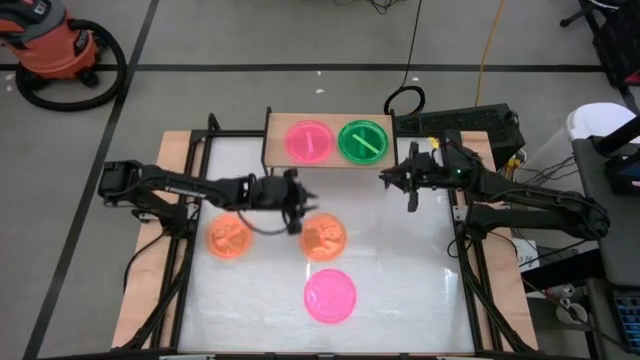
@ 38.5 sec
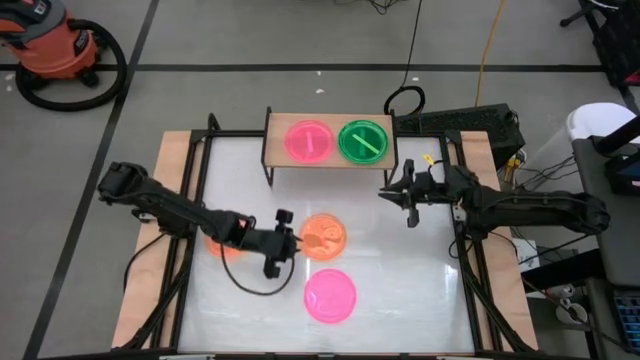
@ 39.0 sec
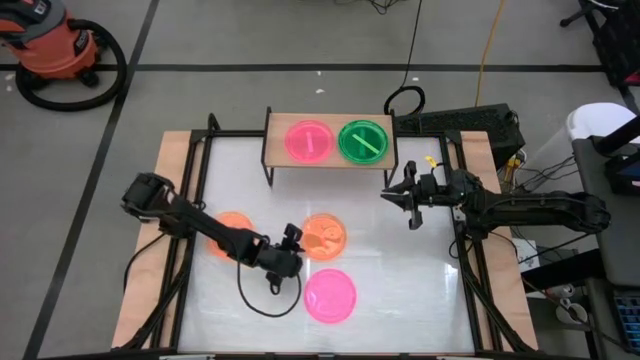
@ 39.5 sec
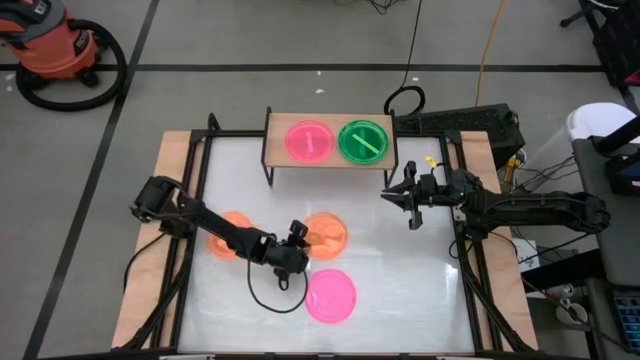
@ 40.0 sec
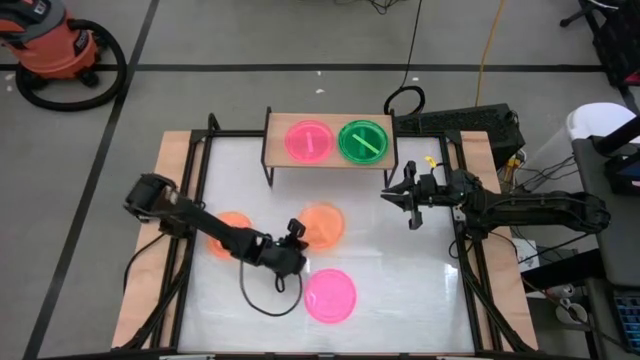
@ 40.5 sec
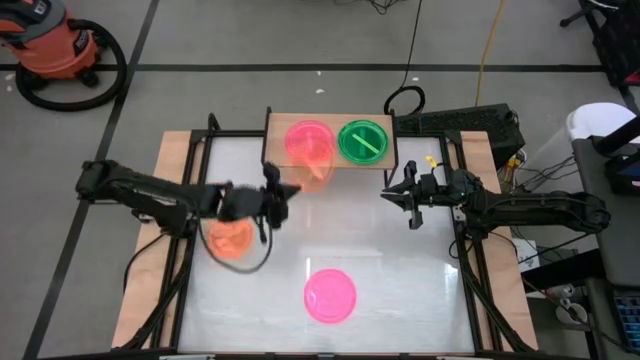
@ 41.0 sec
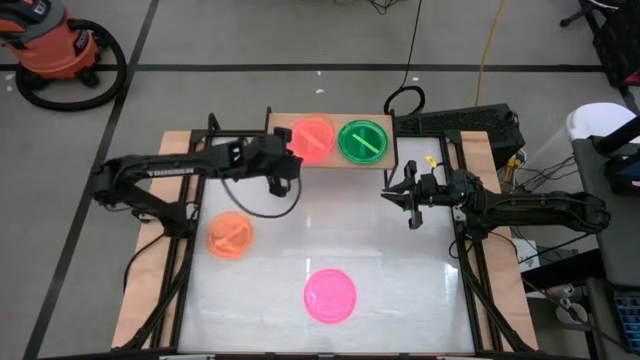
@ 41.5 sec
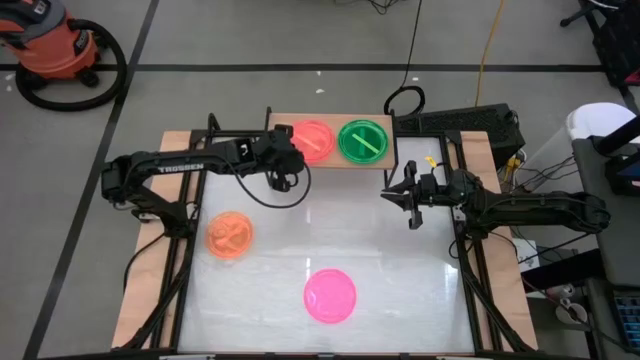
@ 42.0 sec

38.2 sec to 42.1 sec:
Task: Place and stack plates onto a shelf
Stack the right orange plate on top of the pink plate on the shelf

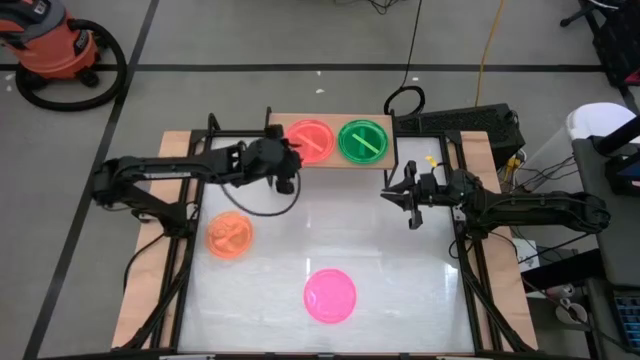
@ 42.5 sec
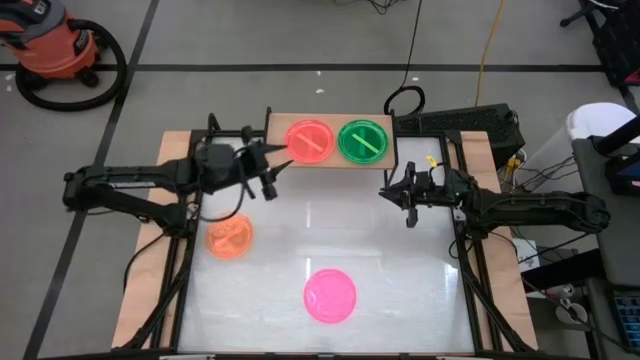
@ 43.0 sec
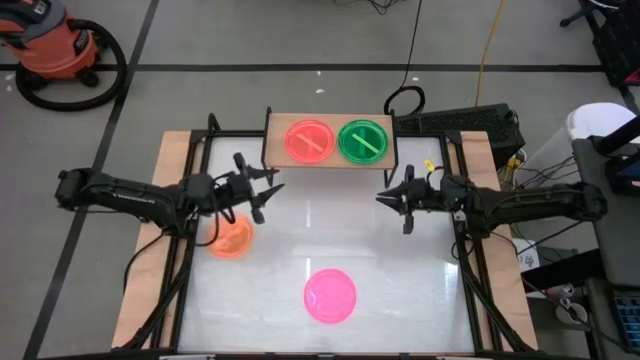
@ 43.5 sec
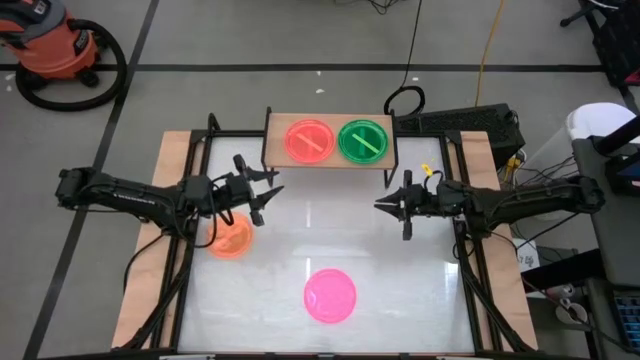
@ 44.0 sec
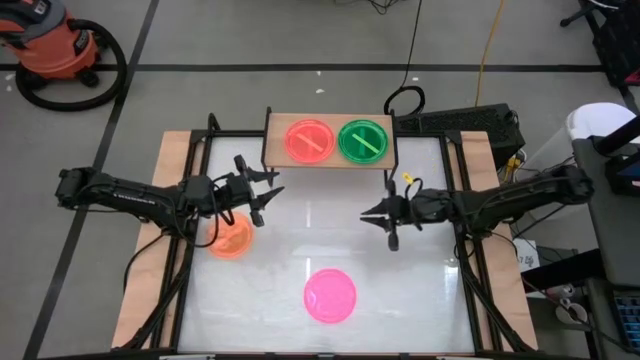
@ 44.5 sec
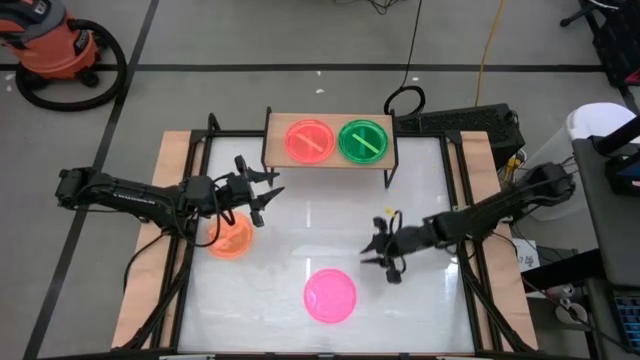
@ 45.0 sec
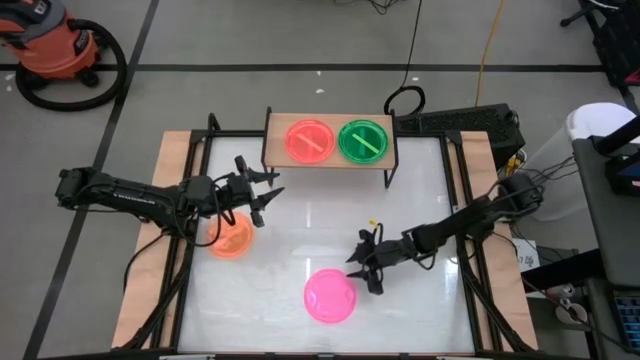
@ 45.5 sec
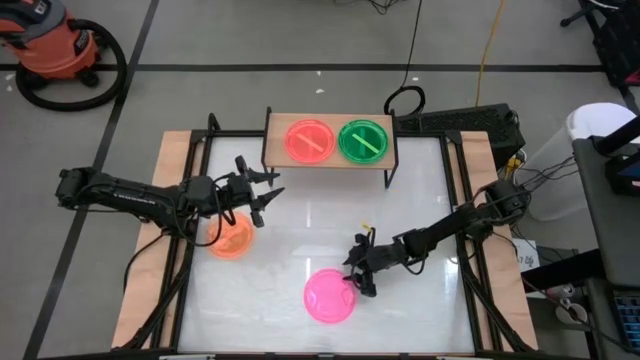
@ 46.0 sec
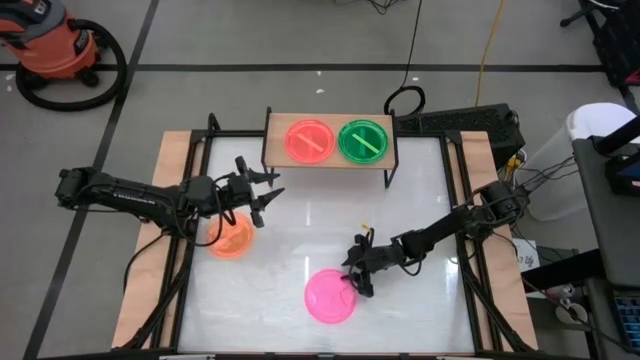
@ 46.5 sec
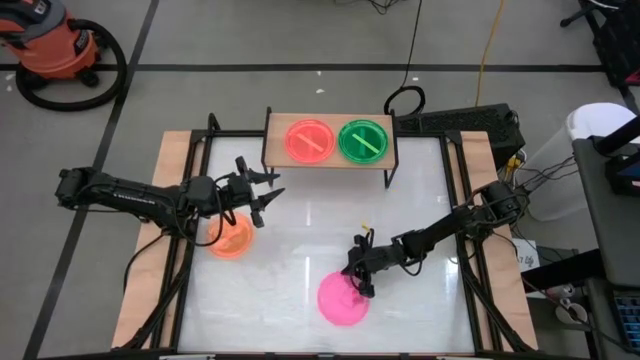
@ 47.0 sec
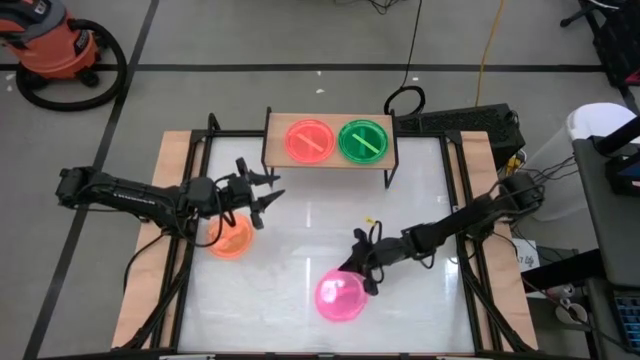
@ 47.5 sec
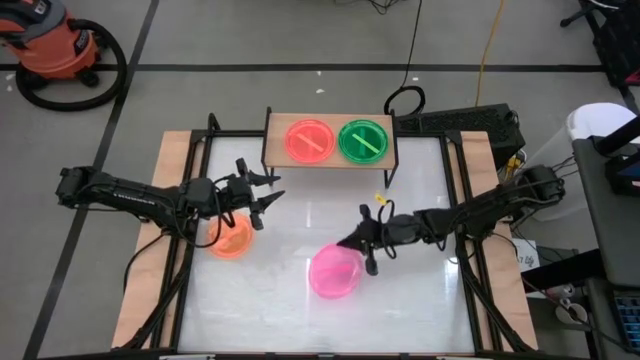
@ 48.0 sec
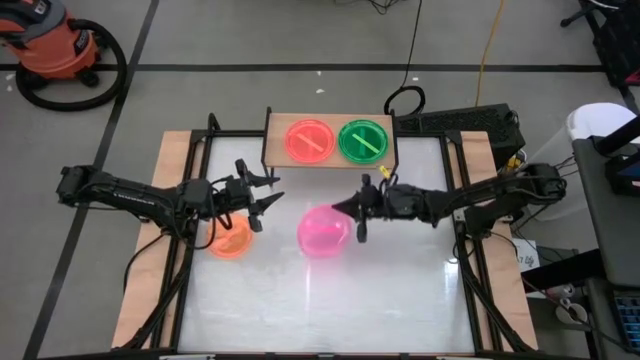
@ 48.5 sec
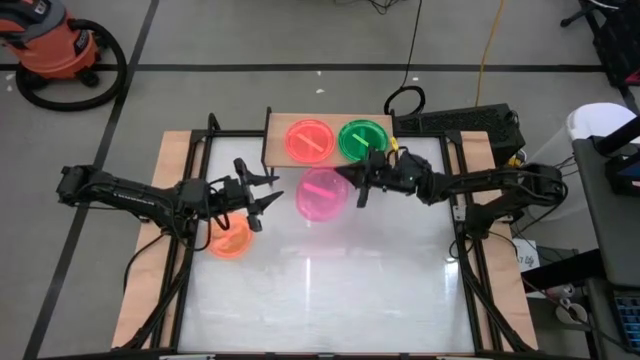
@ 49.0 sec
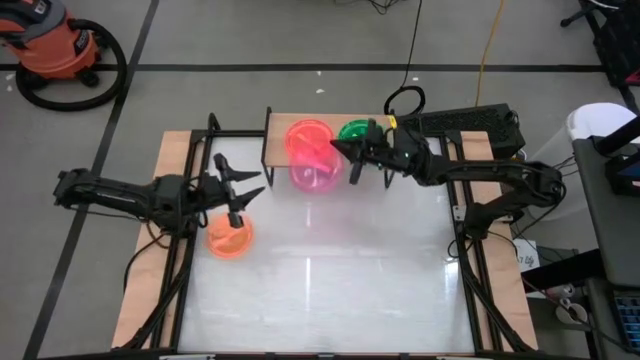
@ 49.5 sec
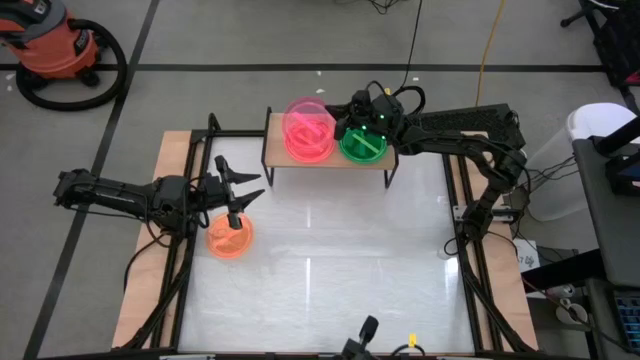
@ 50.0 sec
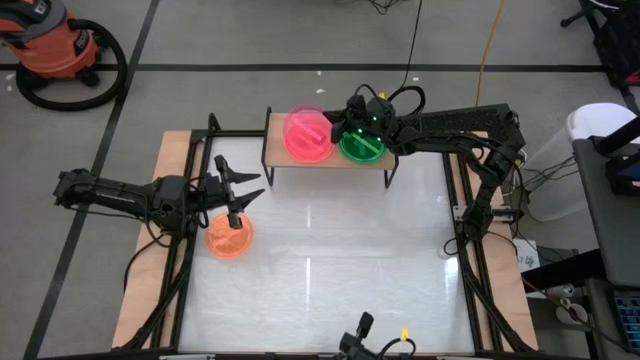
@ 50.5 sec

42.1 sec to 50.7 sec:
Stack the pink plate on top of the orange plate on the shelf

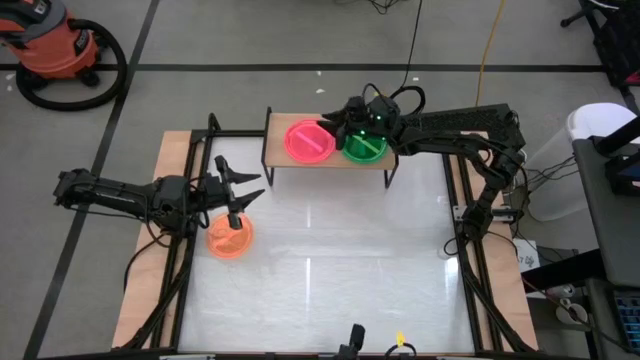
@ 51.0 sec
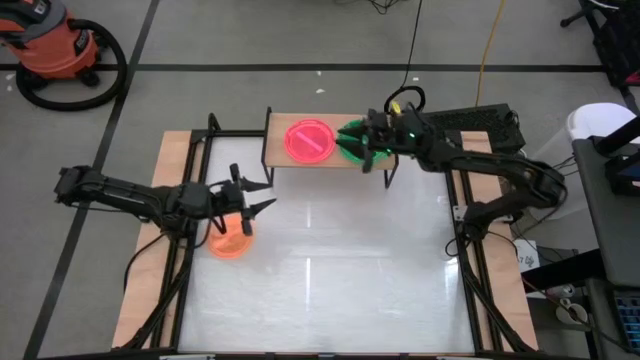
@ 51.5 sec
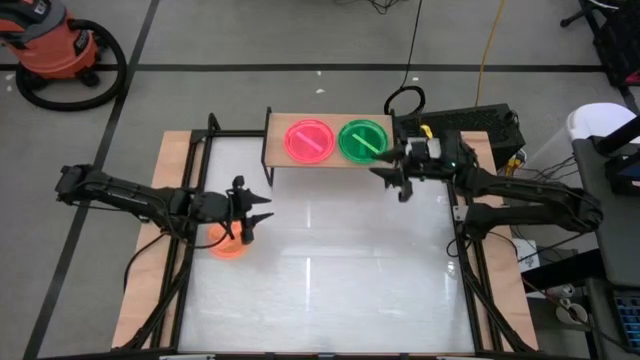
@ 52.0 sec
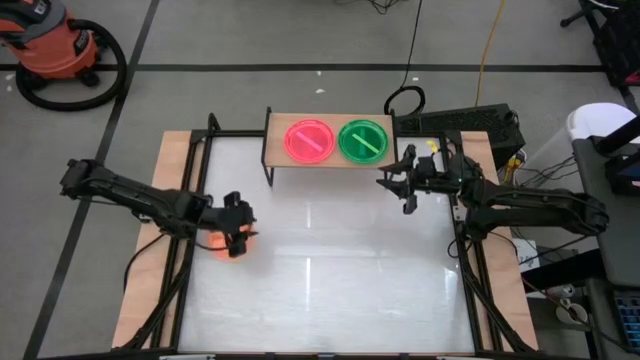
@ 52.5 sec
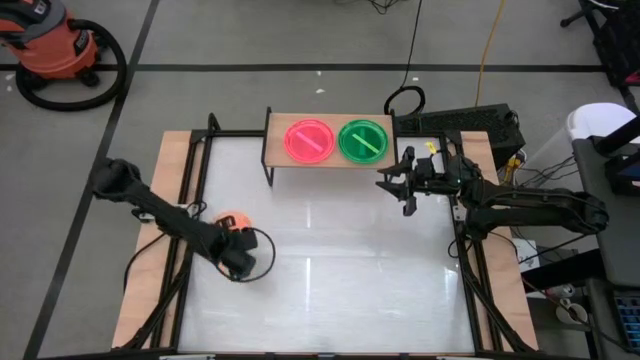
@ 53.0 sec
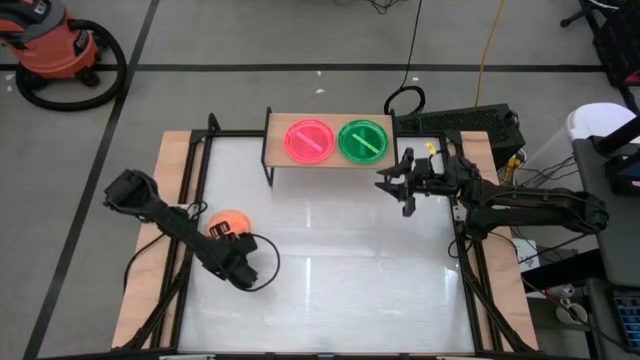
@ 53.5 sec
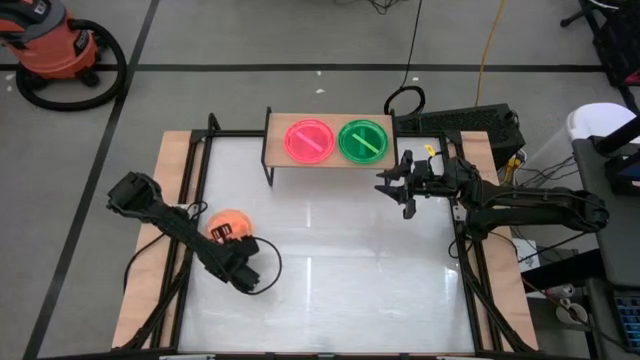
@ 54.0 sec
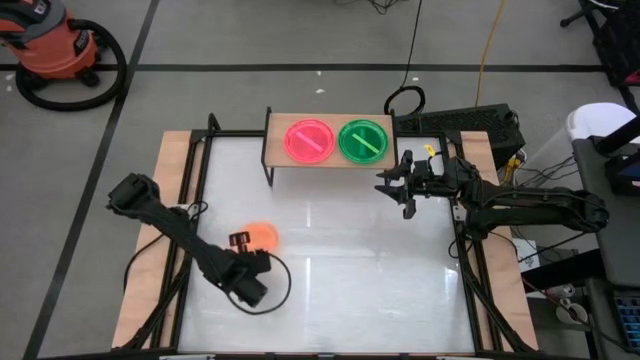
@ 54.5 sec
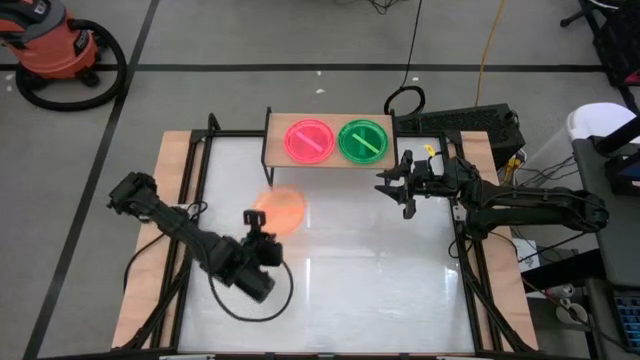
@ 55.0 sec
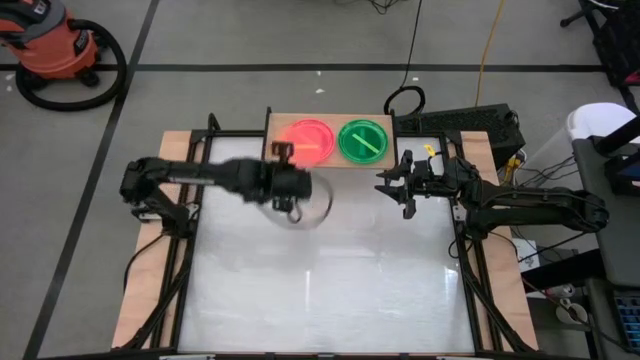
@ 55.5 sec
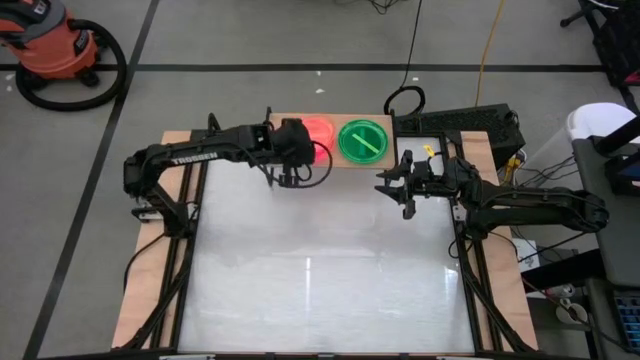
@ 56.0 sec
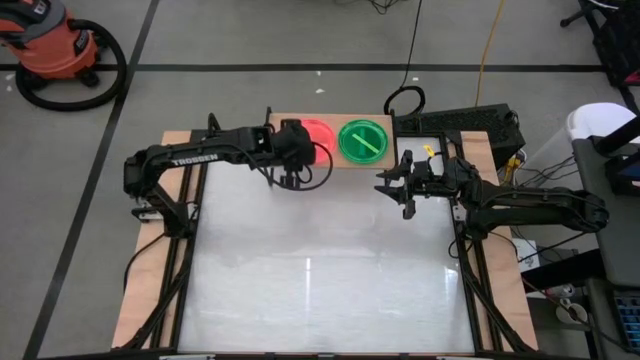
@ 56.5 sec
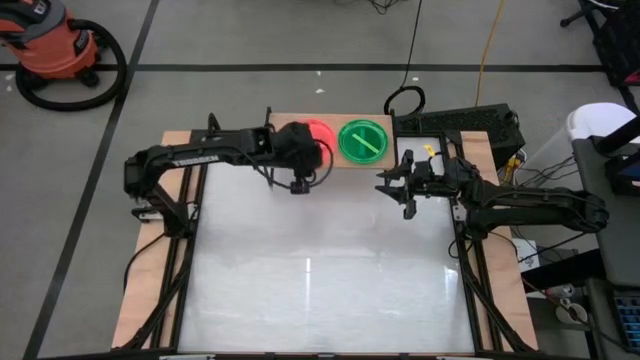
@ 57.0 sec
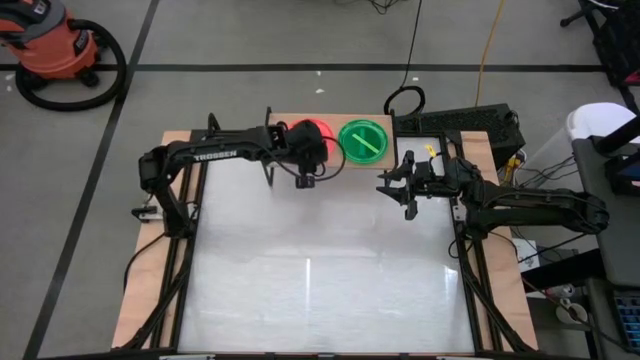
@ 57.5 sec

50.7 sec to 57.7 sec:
Stack the orange plate on top of the pink plate on the shelf
